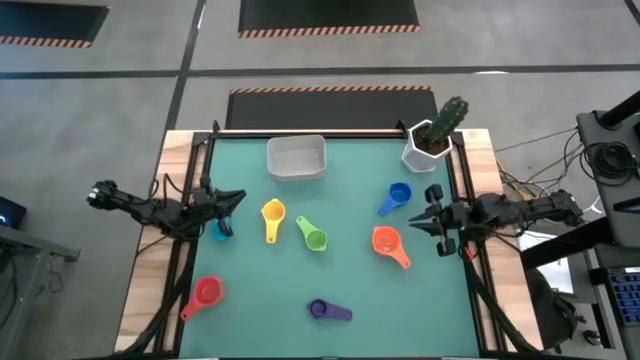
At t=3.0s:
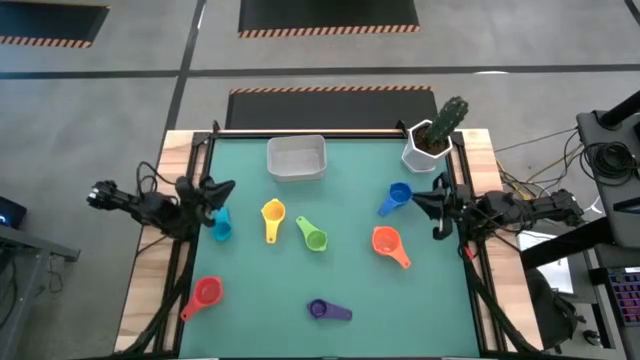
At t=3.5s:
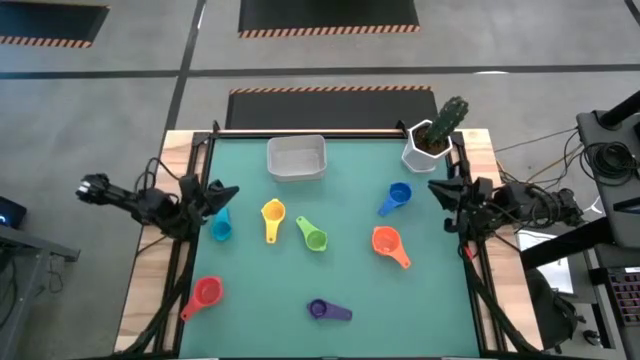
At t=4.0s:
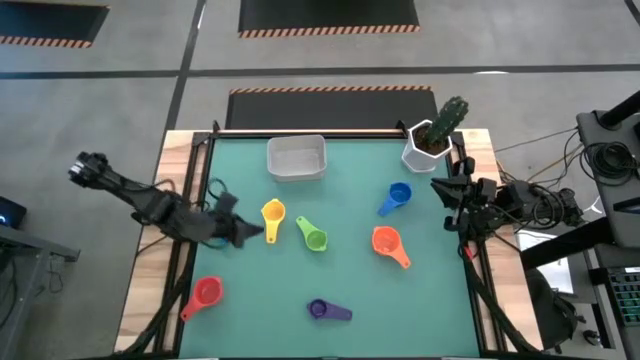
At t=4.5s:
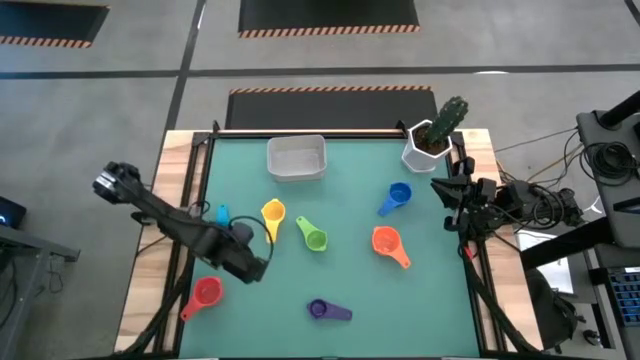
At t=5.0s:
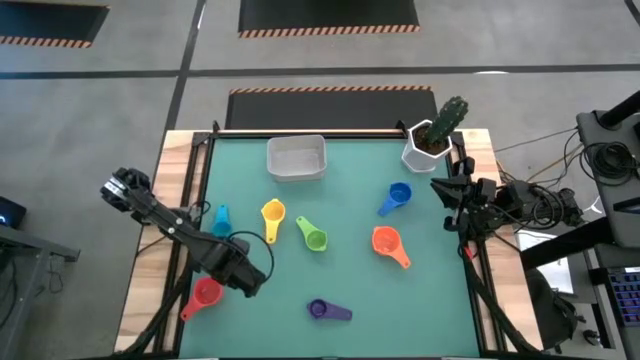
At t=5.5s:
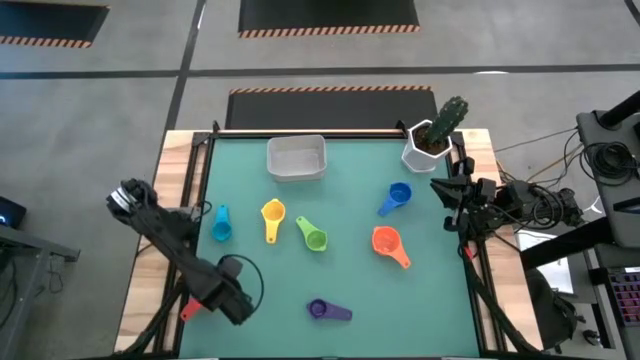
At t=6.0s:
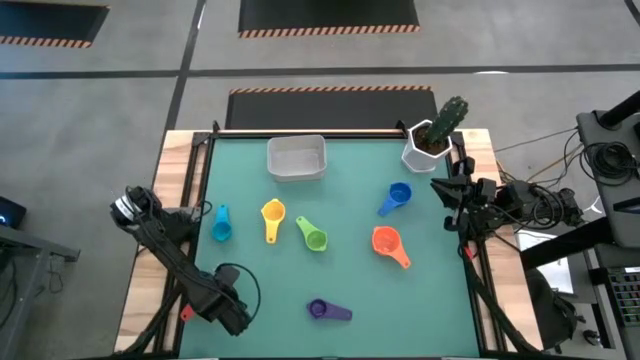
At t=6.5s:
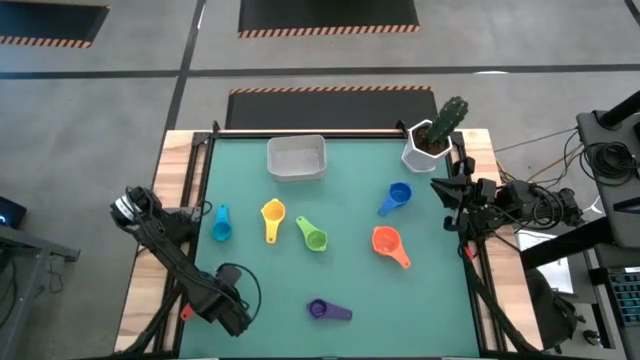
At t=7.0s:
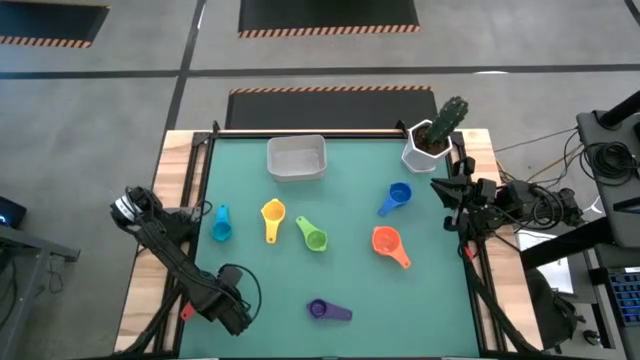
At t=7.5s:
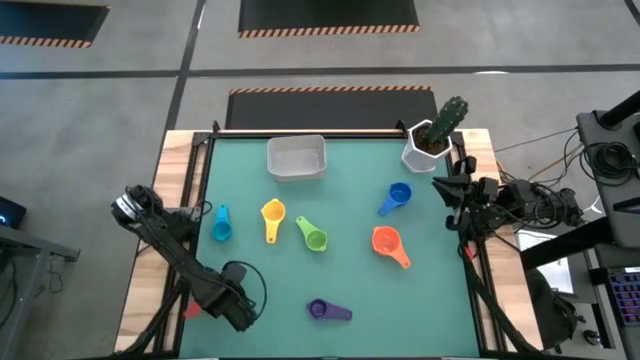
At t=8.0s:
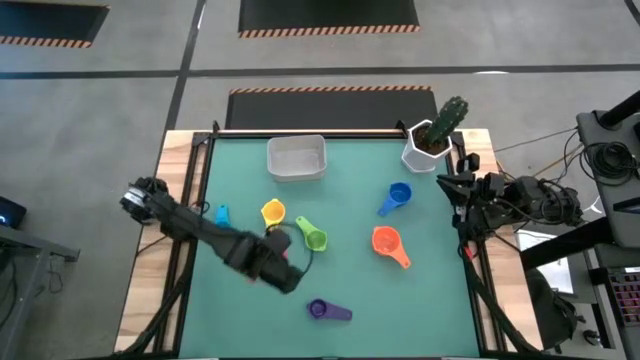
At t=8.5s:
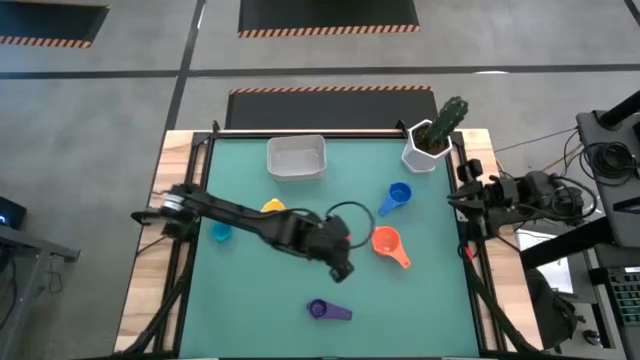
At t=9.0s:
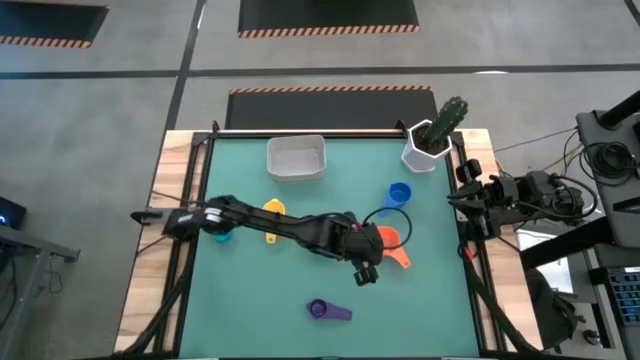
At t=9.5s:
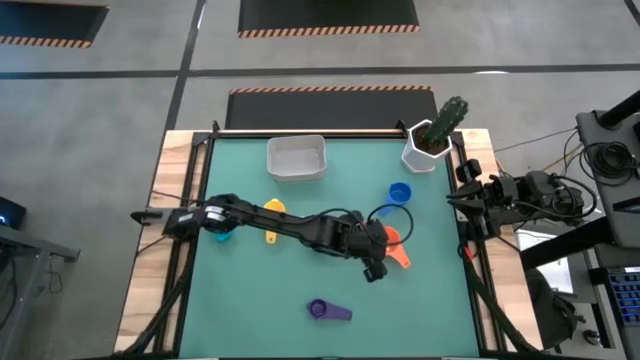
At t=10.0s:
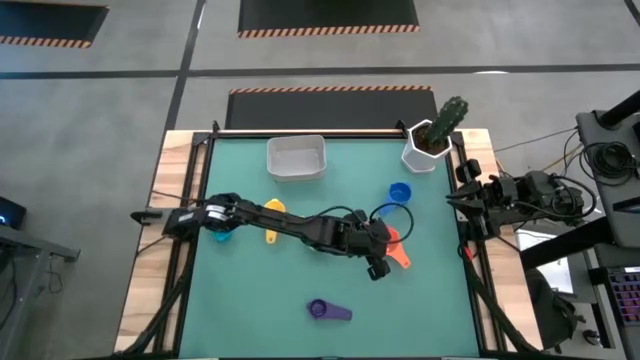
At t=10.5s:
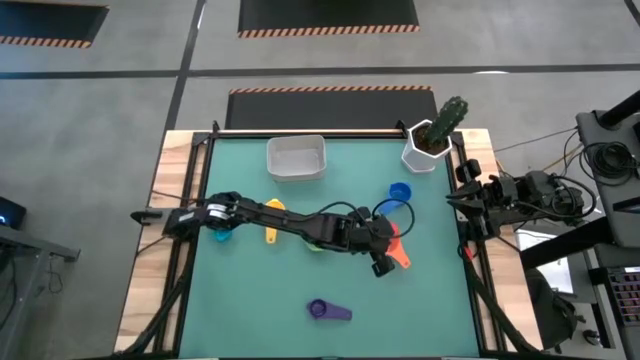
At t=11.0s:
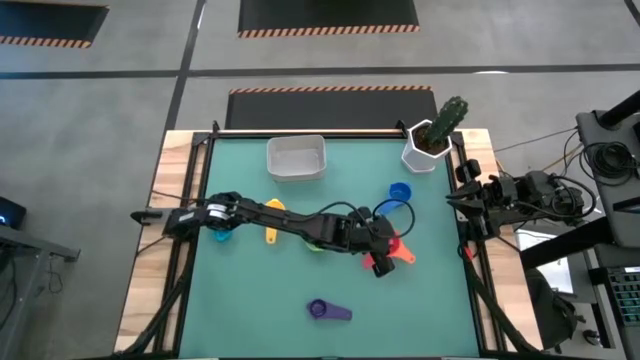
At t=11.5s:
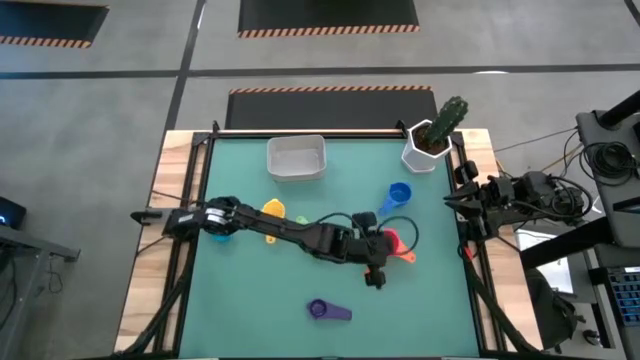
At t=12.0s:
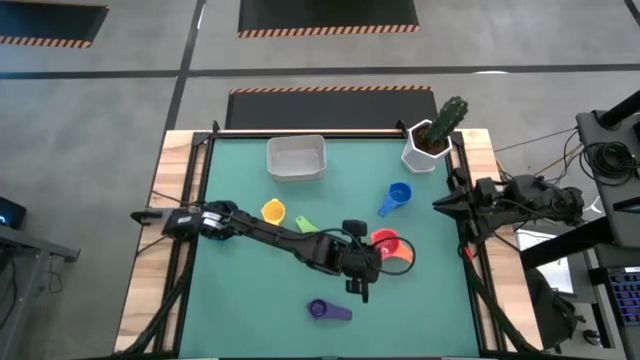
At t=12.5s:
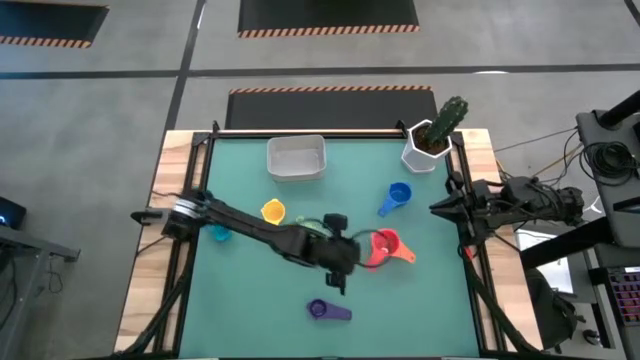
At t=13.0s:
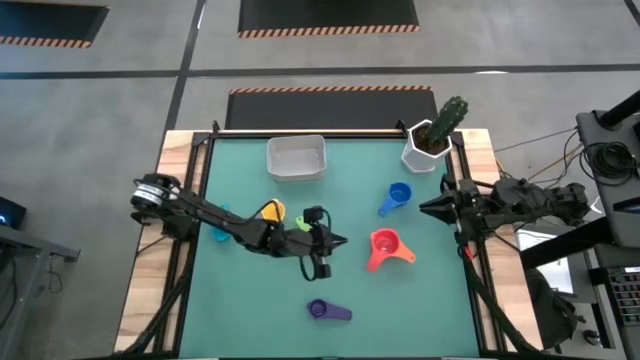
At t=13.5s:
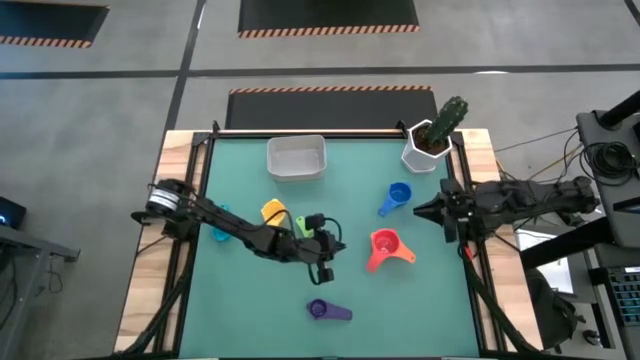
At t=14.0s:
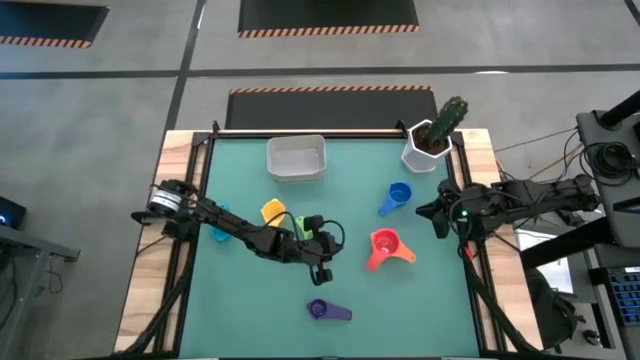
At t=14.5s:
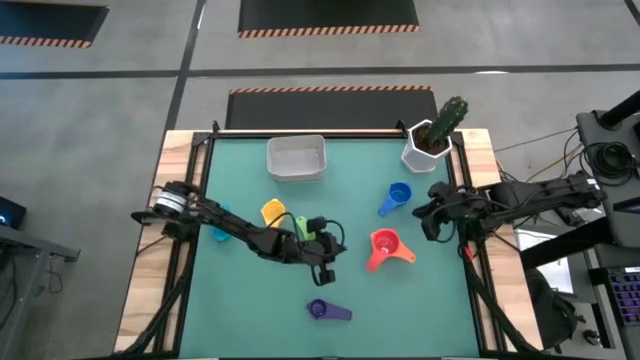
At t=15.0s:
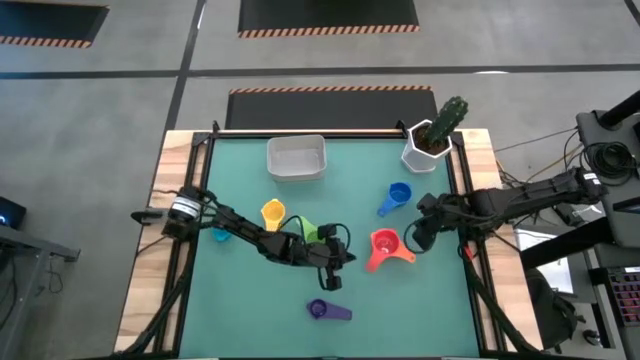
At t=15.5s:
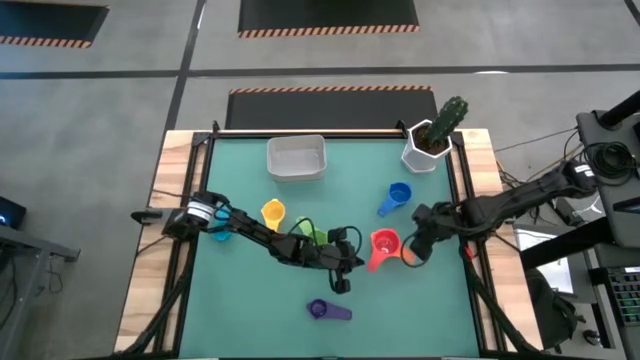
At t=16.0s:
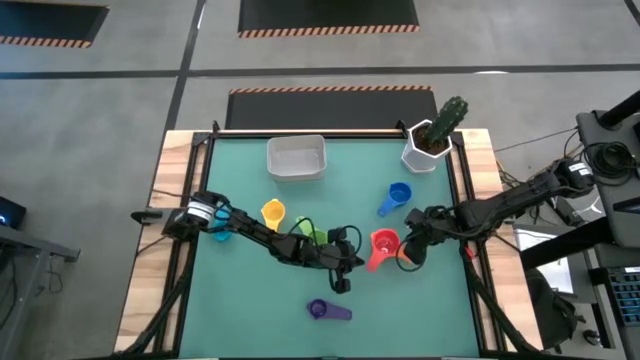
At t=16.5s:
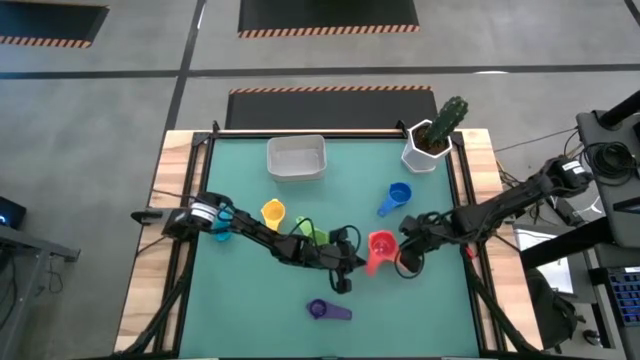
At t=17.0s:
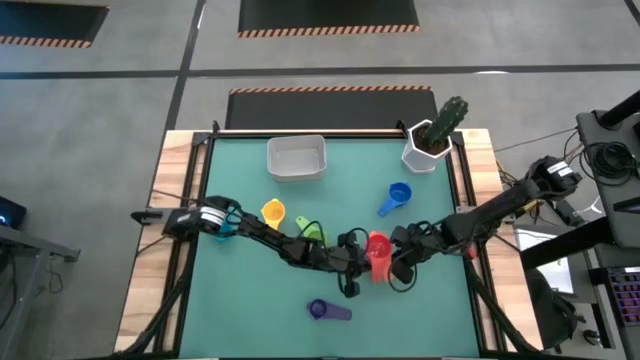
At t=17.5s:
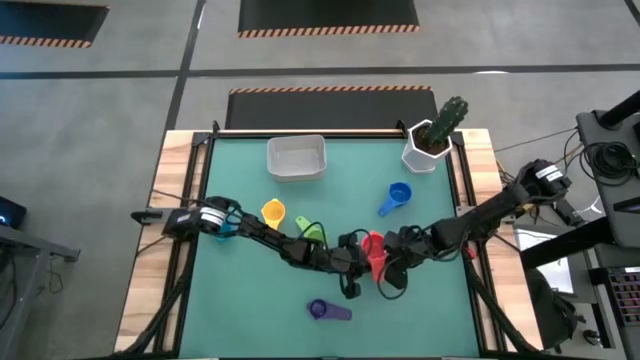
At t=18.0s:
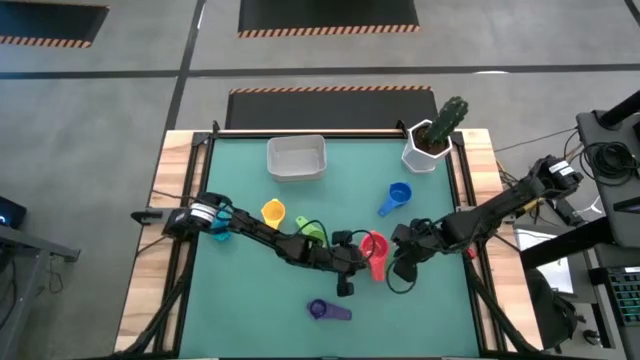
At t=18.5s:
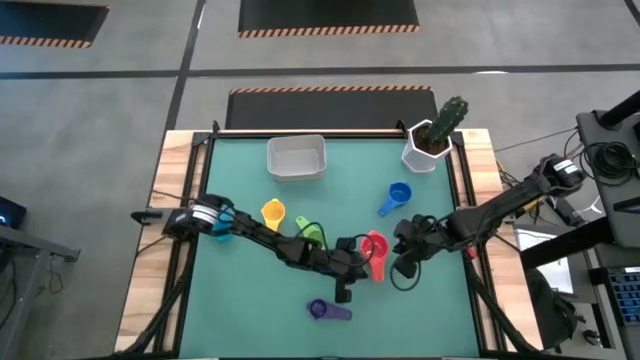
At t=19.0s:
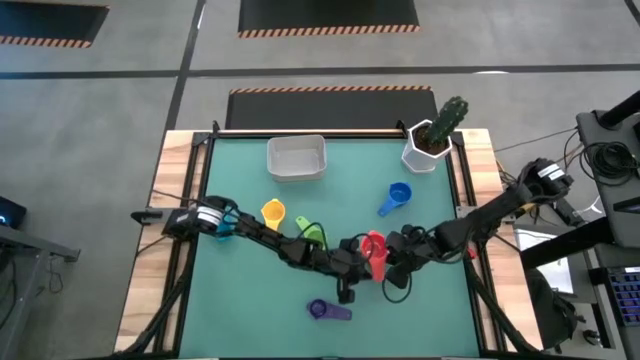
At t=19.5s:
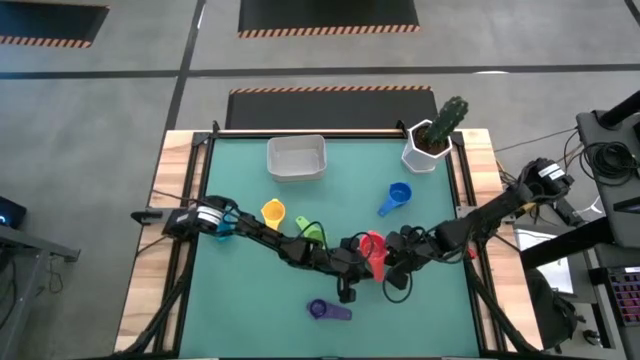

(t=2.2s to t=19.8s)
Task: Nest measuring cups in basket
Stack the red measuring cup on top of the orange measuring cup

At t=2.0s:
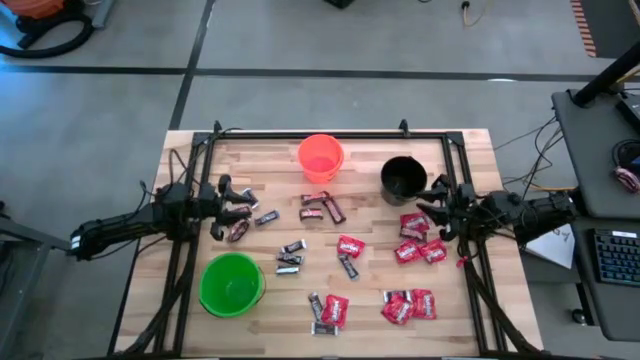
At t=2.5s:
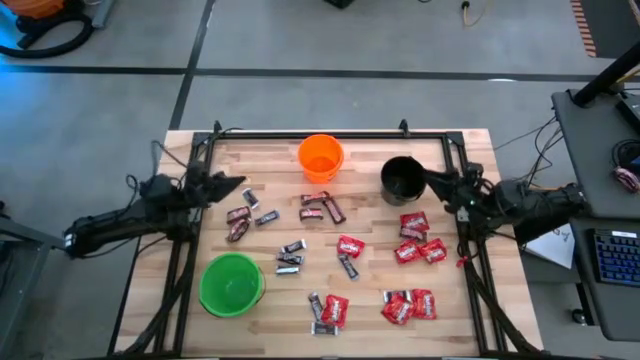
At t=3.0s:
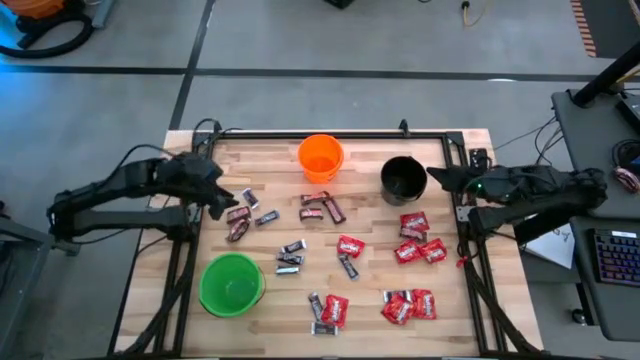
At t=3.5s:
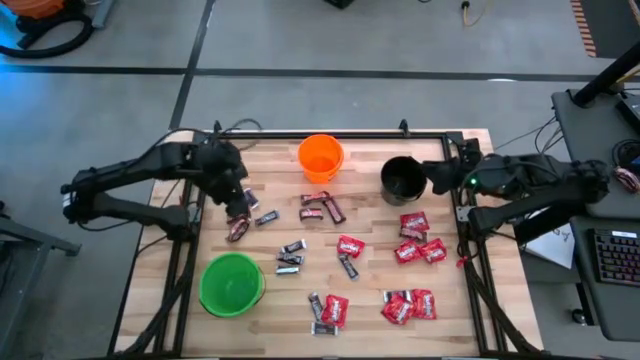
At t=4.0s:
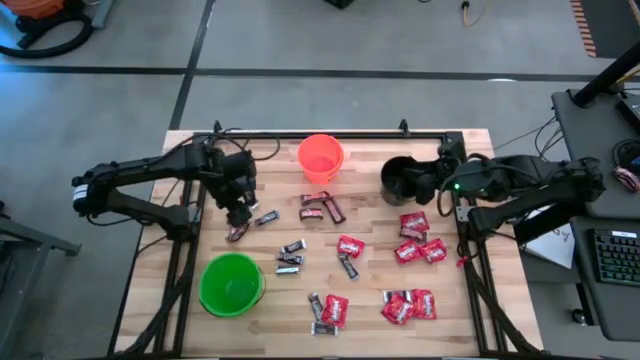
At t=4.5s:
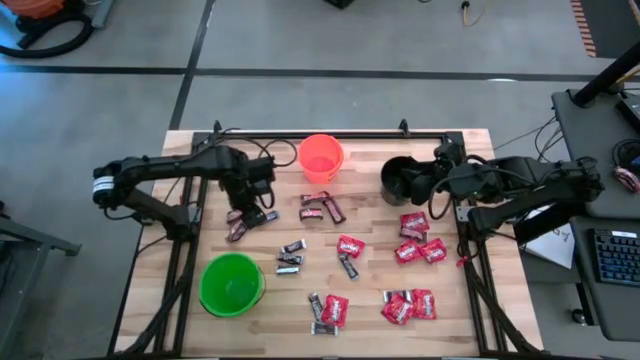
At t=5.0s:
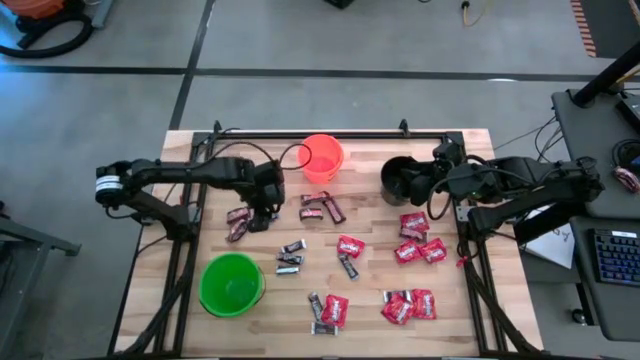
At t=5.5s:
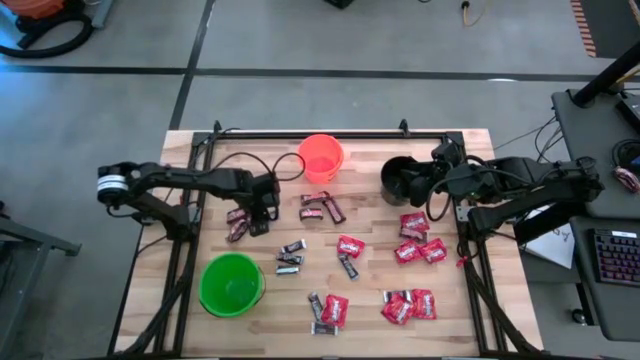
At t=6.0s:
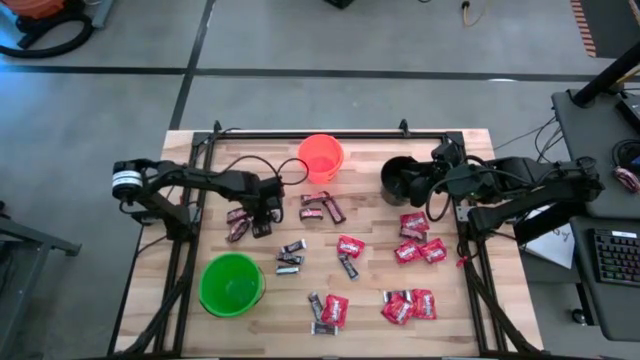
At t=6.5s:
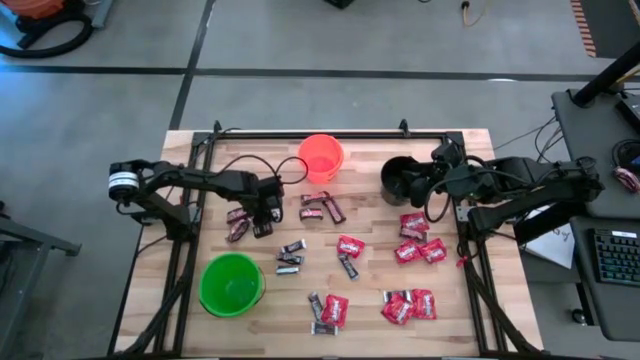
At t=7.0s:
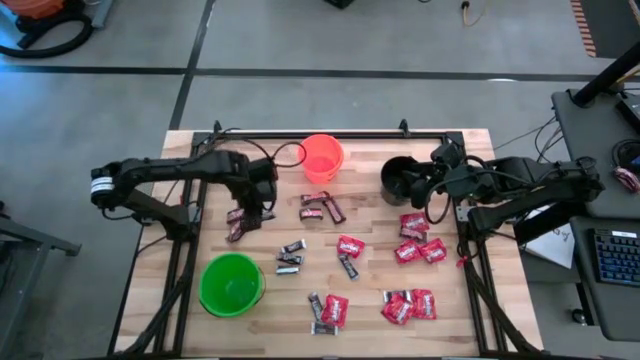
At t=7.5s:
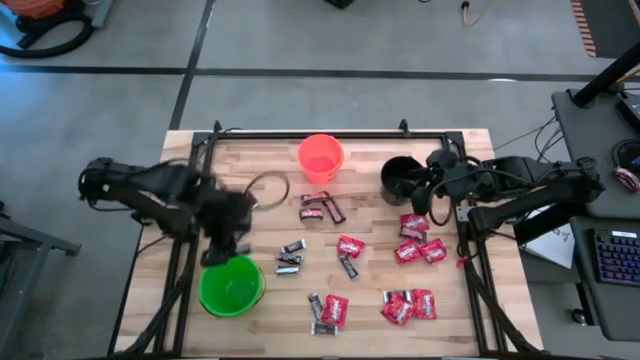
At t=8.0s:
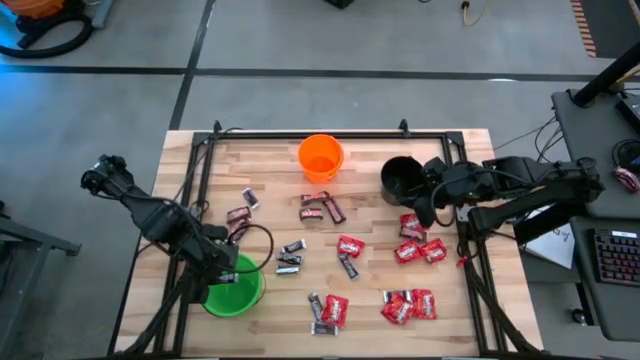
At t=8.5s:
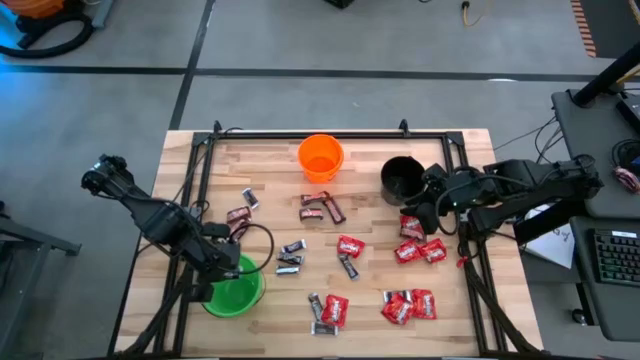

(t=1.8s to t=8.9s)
Task: Sort candy
Put the black chocolate into the green bucket
